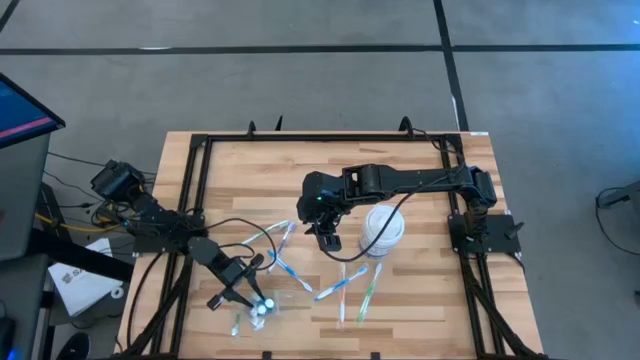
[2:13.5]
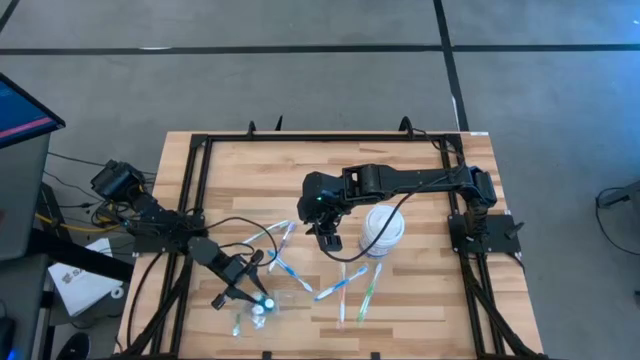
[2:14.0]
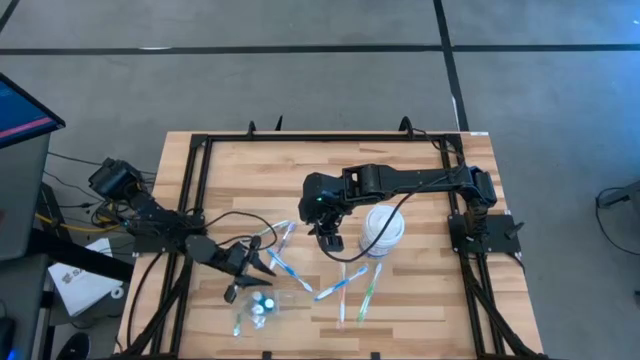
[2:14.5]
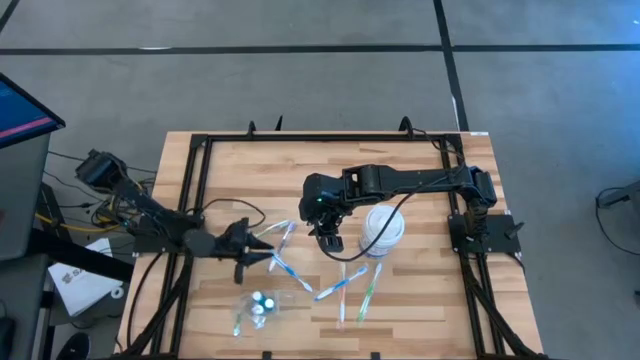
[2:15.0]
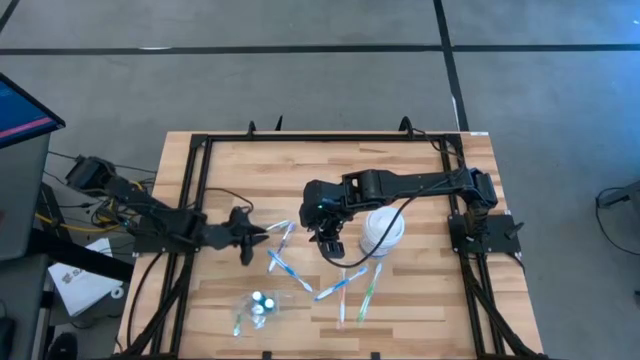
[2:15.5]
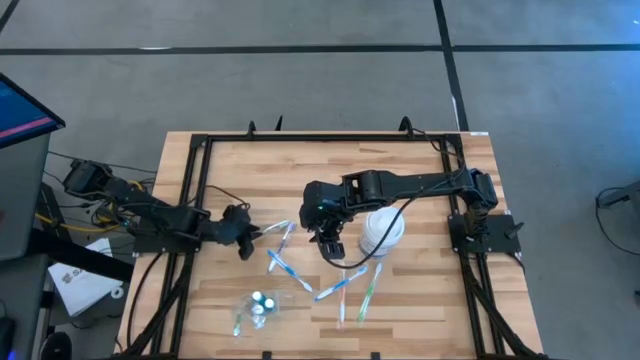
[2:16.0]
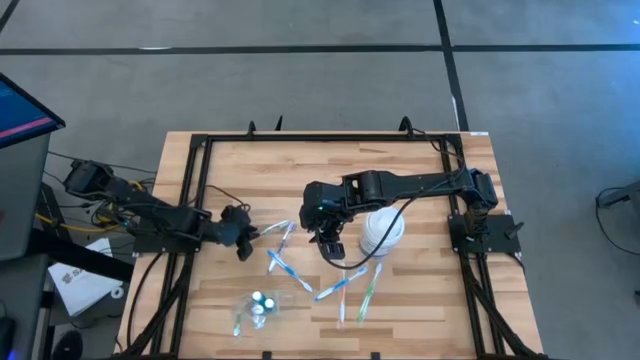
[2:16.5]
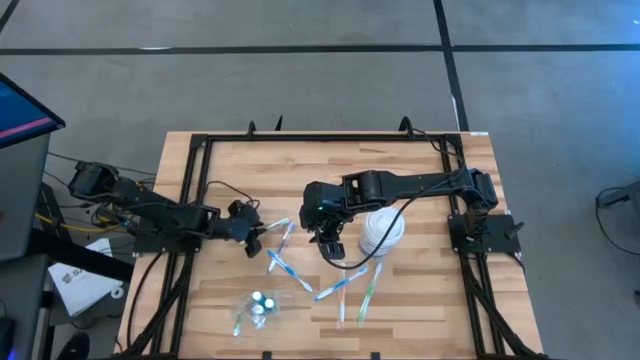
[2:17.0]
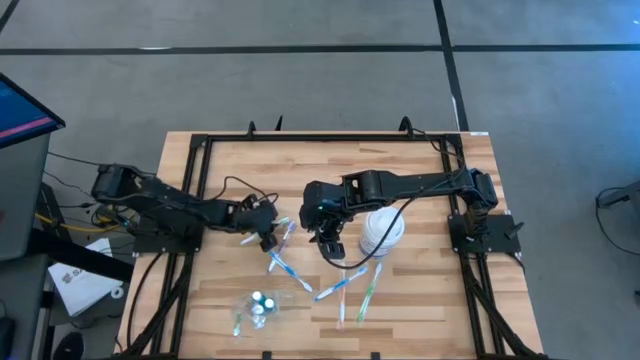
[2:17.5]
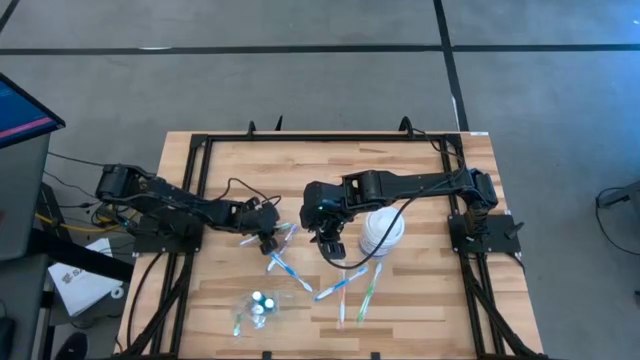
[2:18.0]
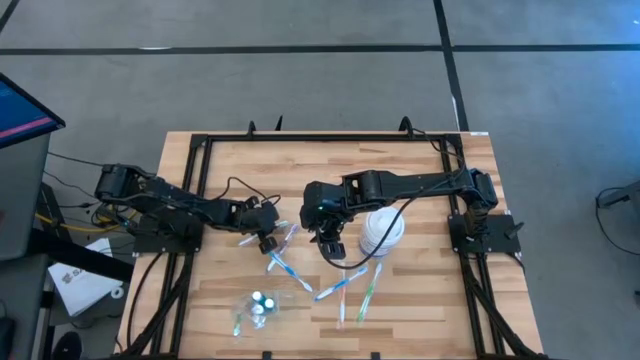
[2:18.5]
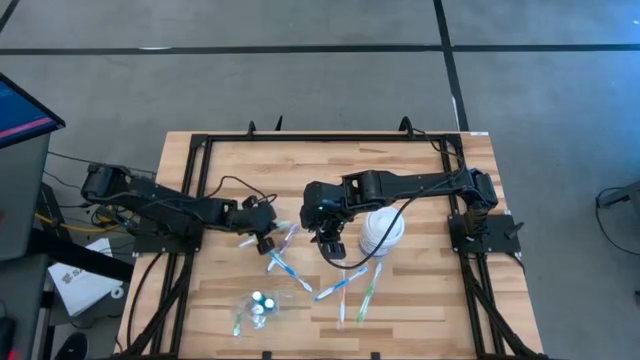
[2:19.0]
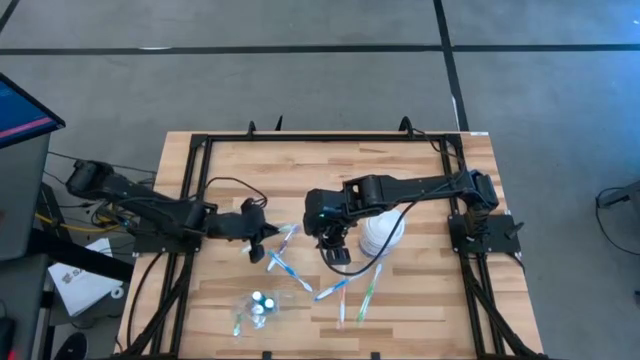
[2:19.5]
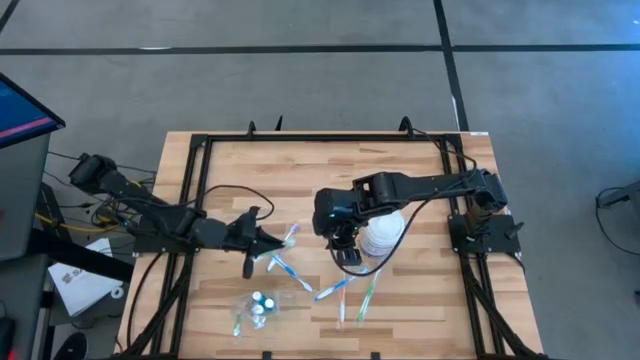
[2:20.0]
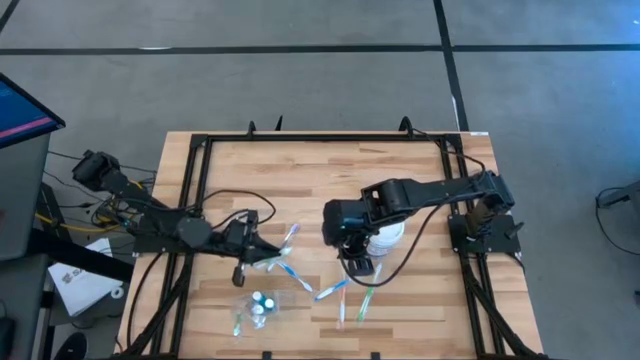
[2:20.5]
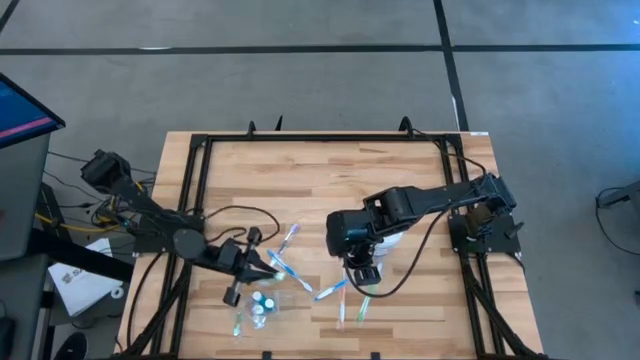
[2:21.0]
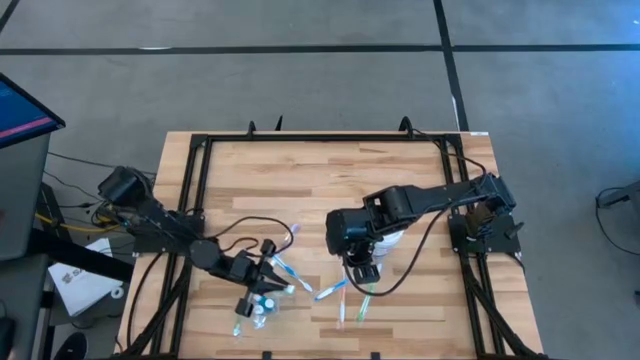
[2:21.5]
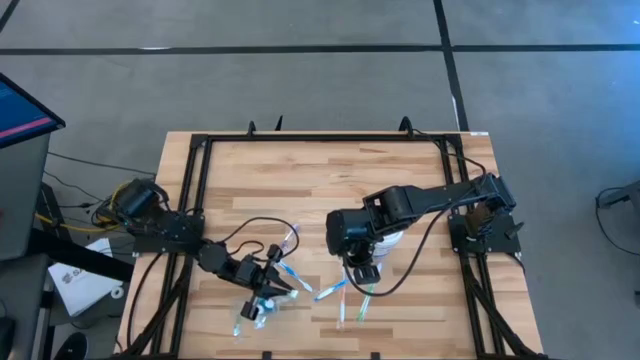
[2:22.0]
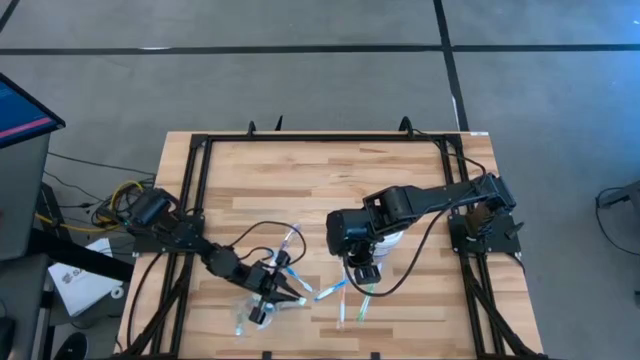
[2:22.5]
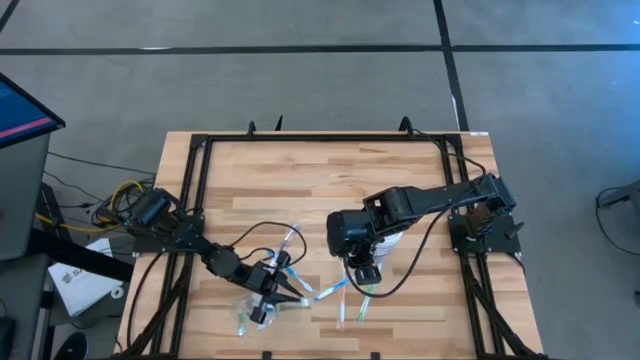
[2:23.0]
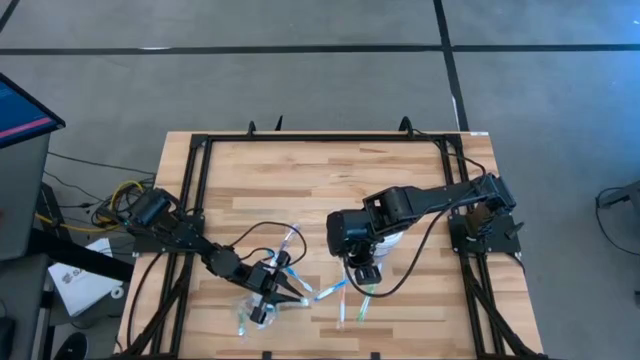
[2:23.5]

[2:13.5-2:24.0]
Task: Pick & Place toothbrushing station
Put the left green toothbrush into the transparent organizer

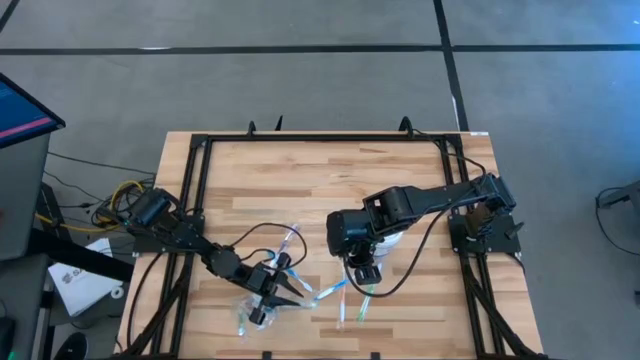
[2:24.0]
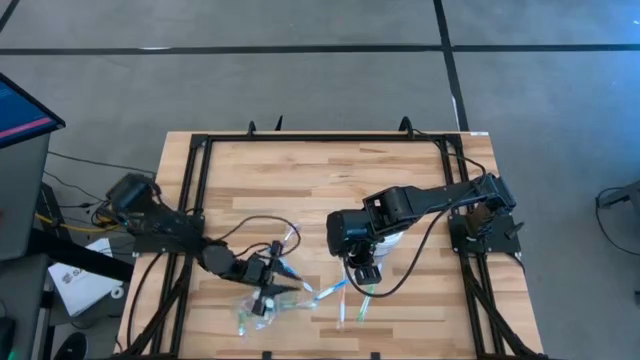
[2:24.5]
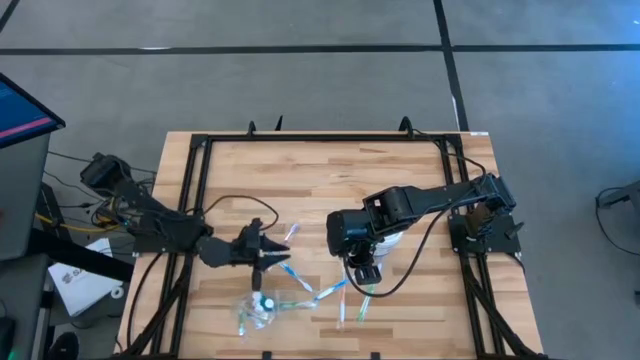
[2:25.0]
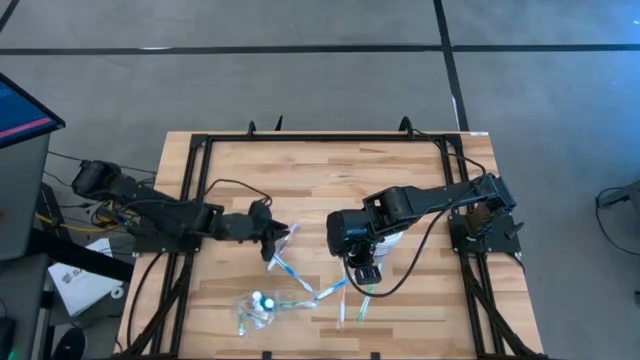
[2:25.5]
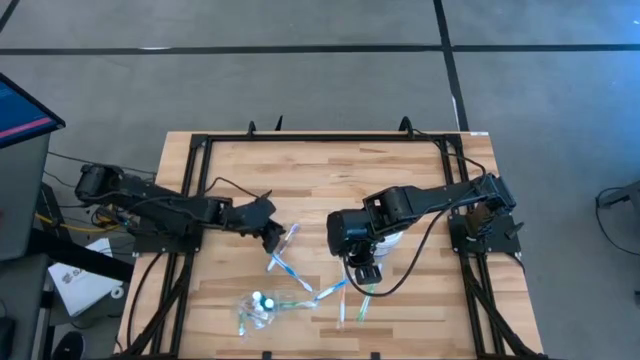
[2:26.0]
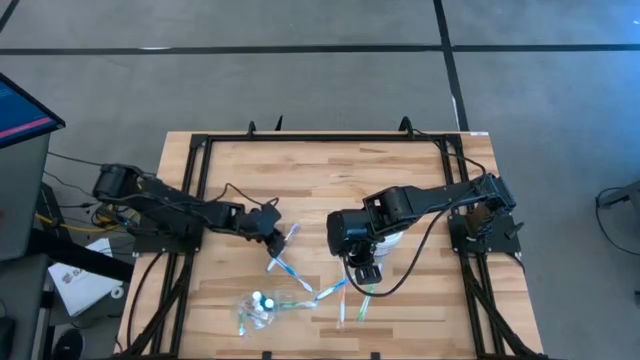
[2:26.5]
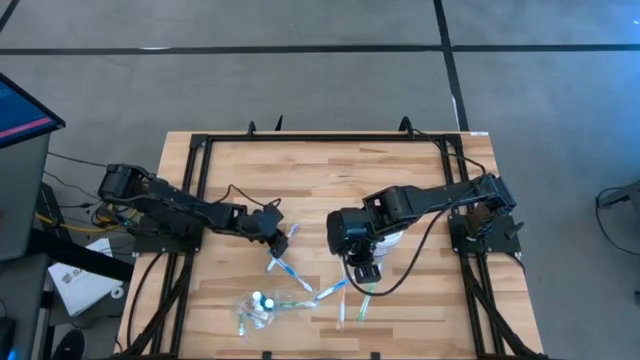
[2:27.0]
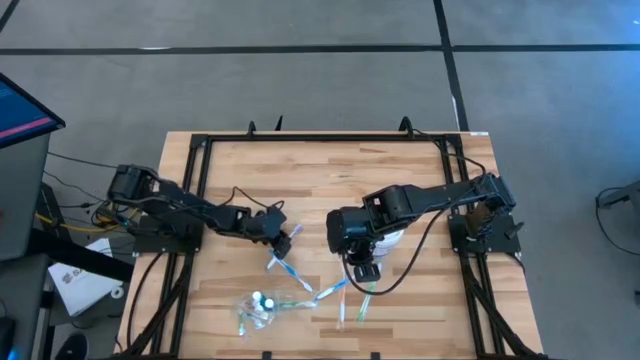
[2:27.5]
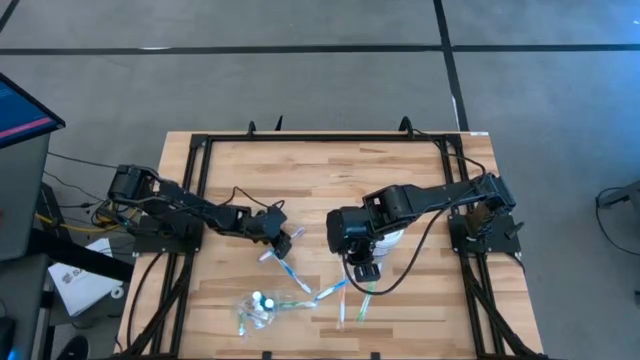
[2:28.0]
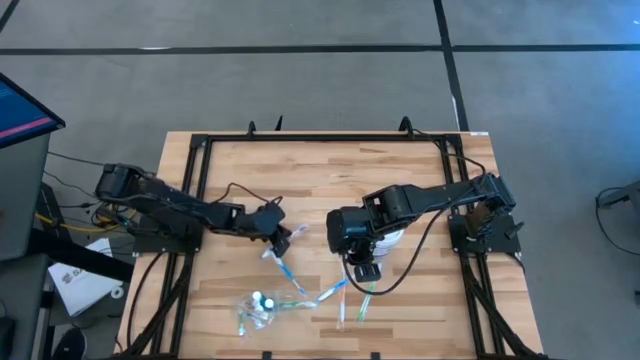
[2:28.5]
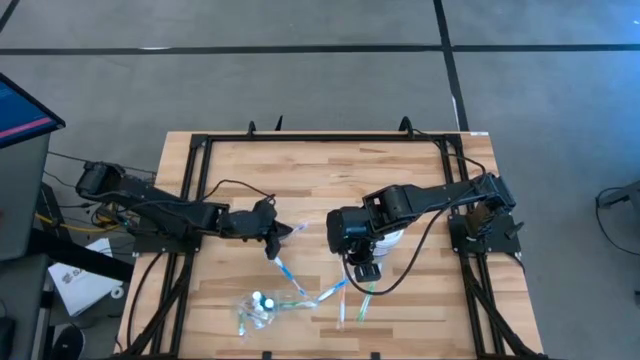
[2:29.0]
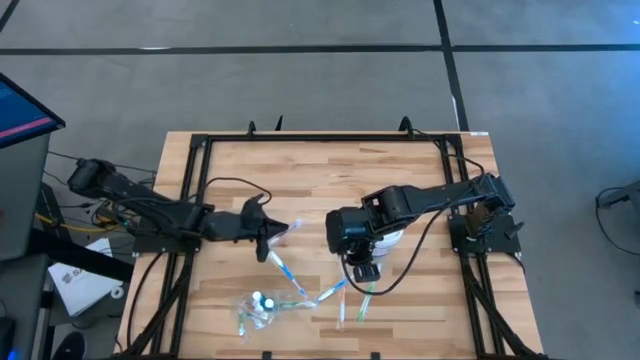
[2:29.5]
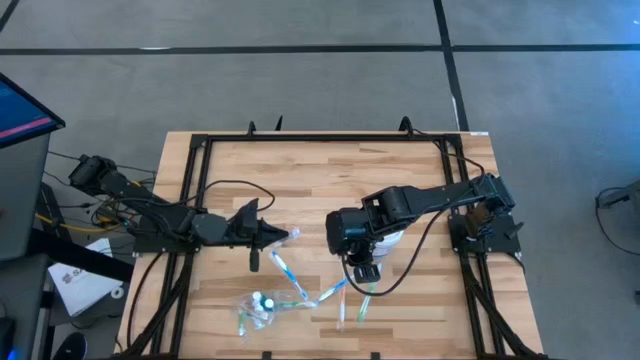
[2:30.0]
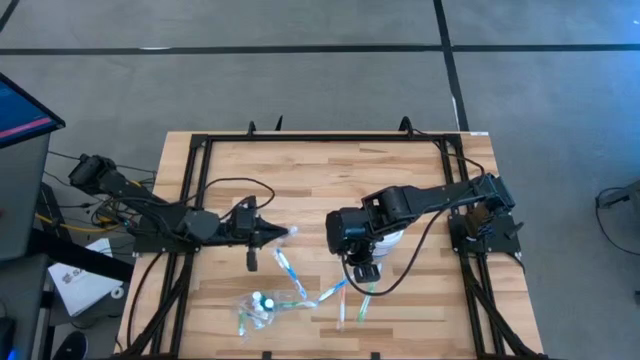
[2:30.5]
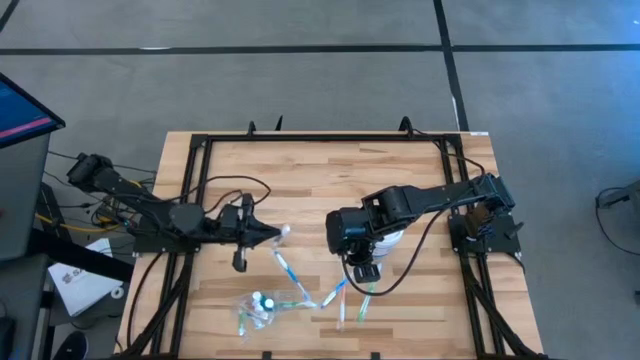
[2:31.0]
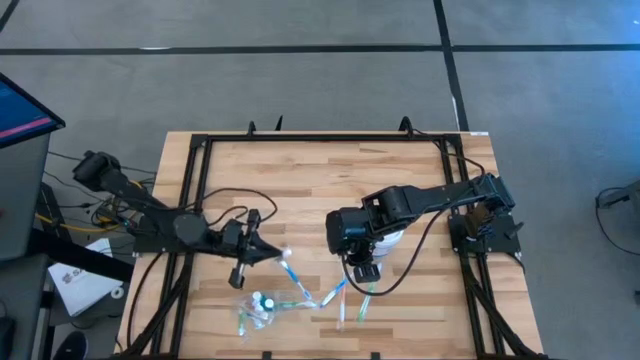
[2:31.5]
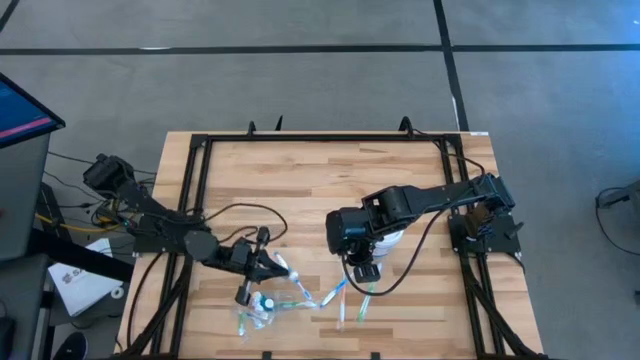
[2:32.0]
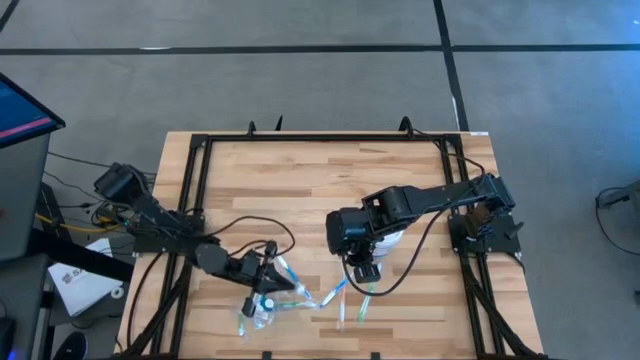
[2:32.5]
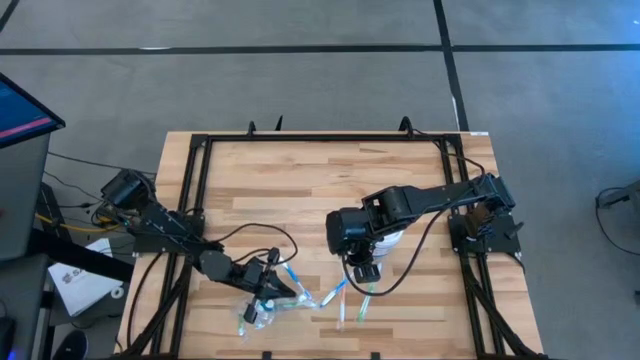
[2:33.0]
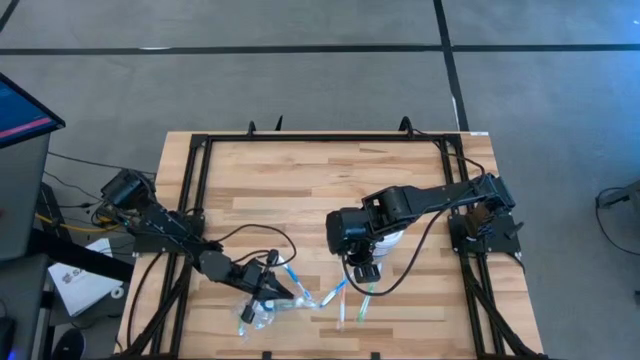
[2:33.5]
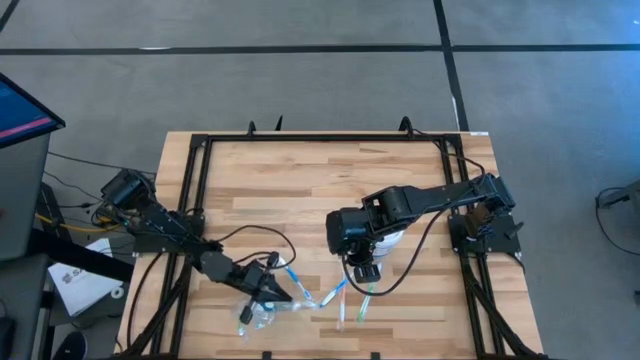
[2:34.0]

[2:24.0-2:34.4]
Put the purple toothbrush into the transparent organizer
